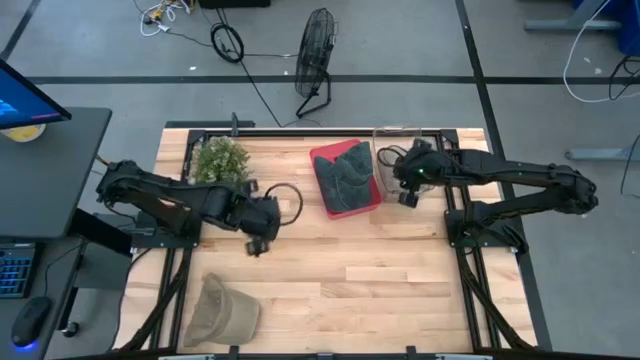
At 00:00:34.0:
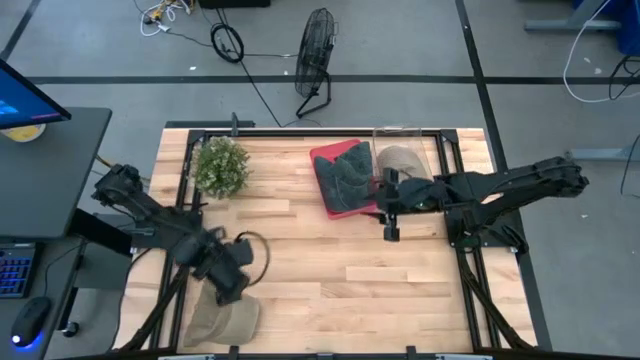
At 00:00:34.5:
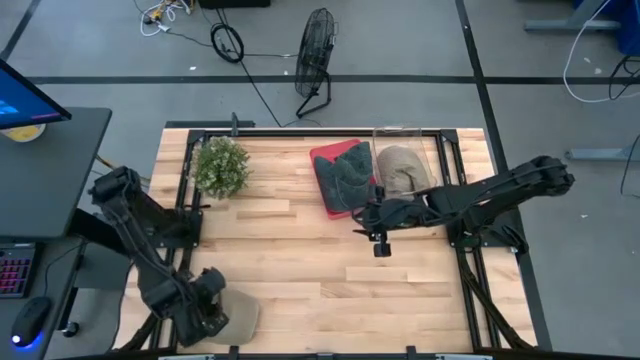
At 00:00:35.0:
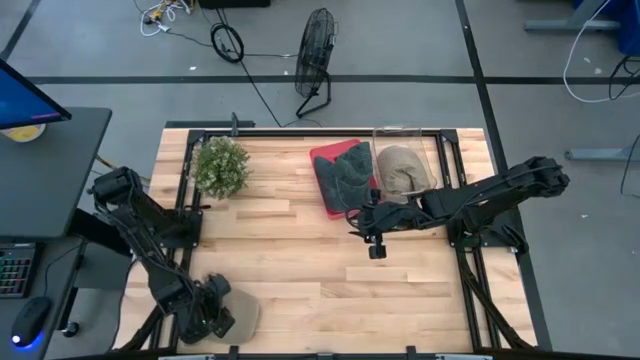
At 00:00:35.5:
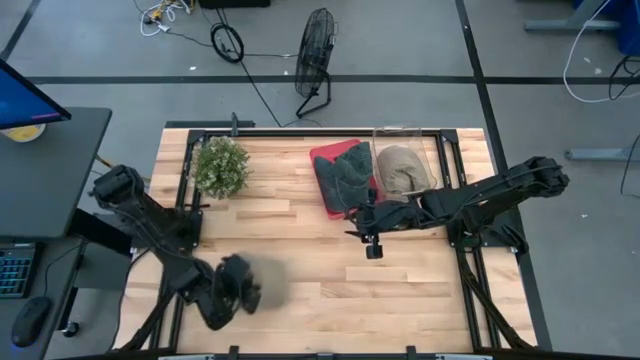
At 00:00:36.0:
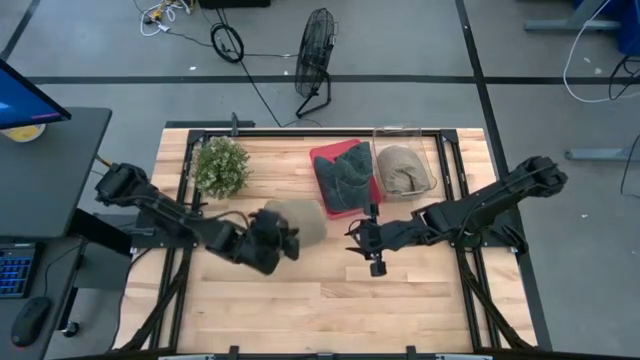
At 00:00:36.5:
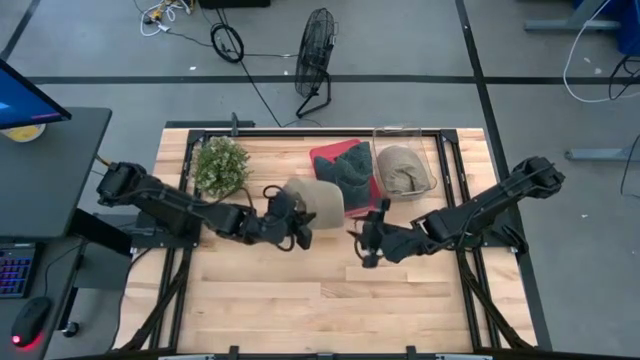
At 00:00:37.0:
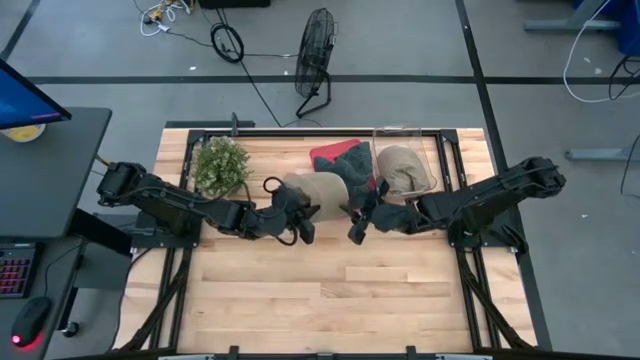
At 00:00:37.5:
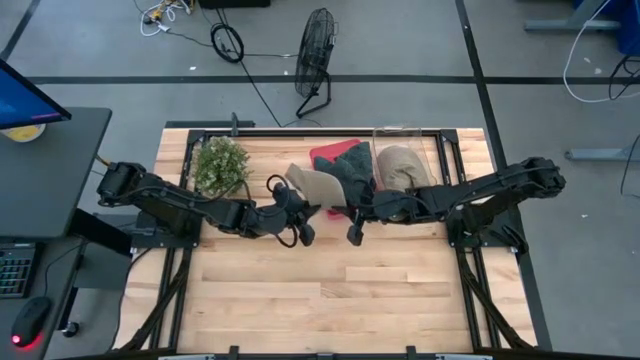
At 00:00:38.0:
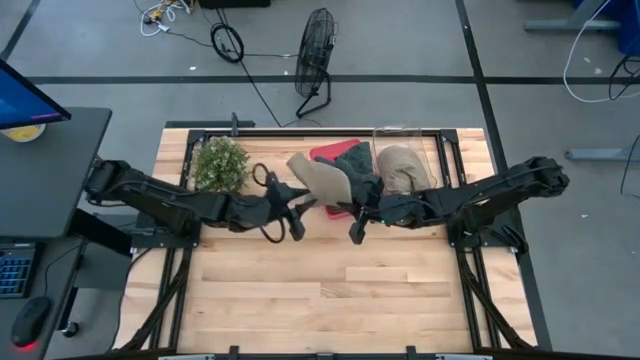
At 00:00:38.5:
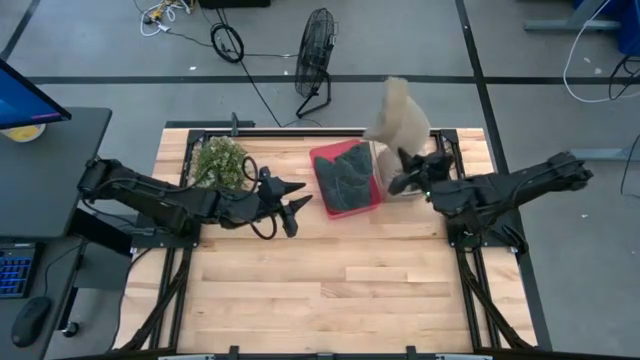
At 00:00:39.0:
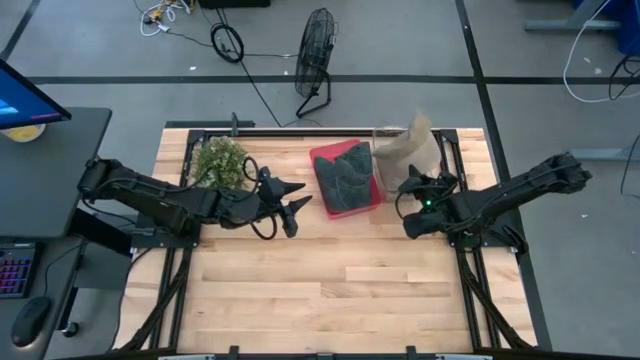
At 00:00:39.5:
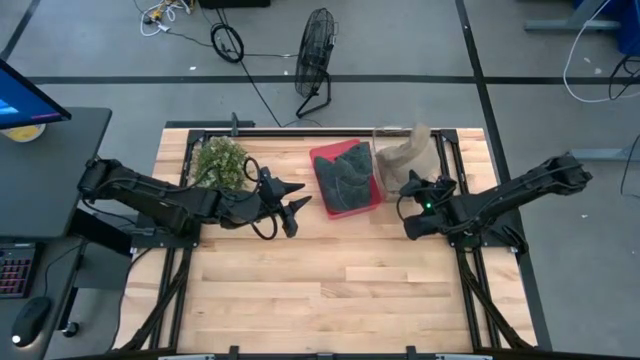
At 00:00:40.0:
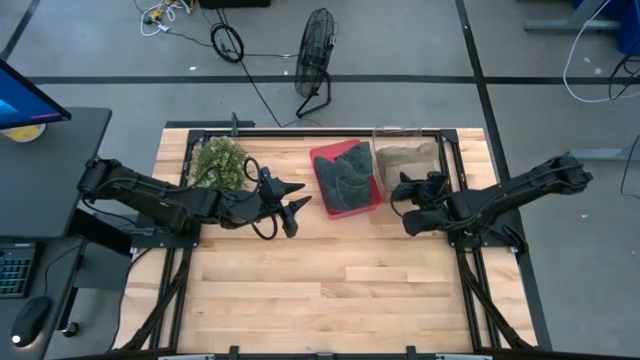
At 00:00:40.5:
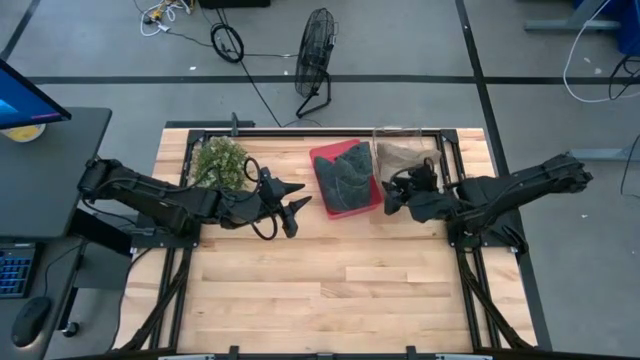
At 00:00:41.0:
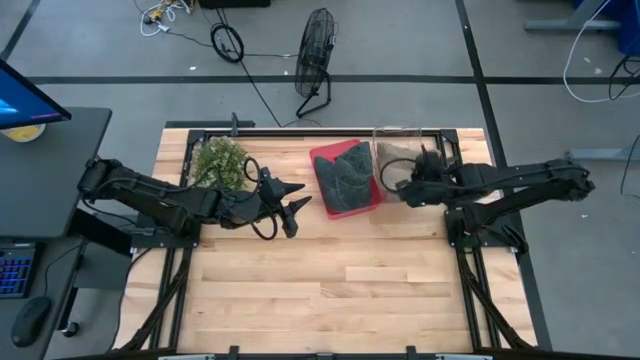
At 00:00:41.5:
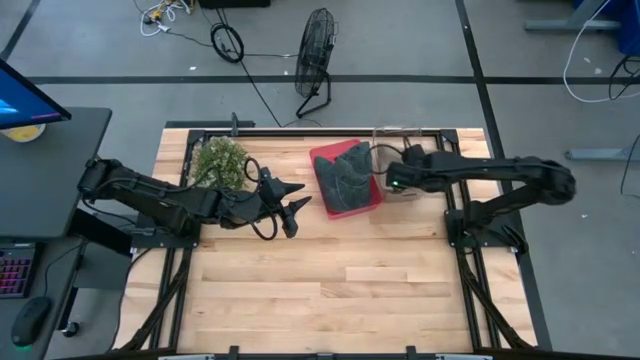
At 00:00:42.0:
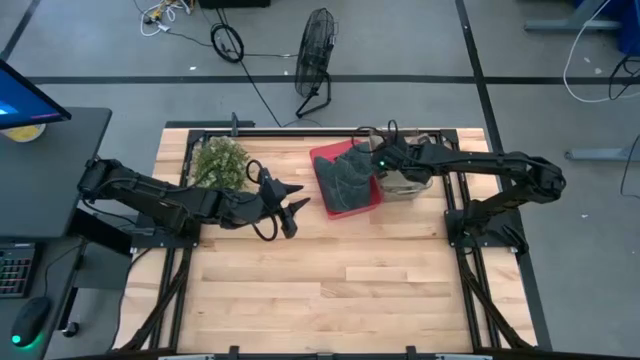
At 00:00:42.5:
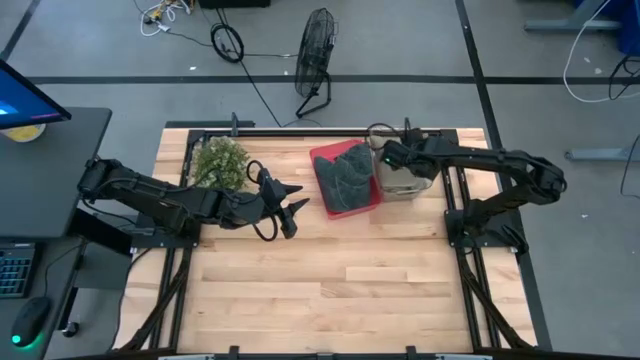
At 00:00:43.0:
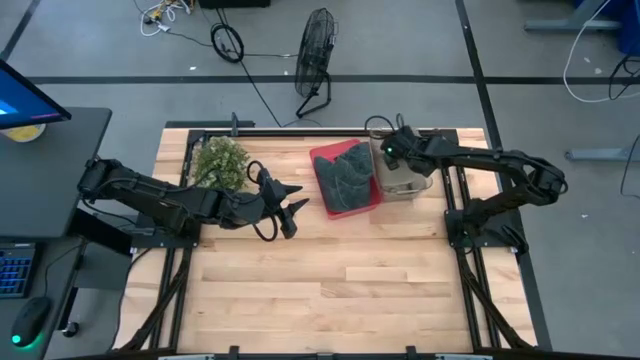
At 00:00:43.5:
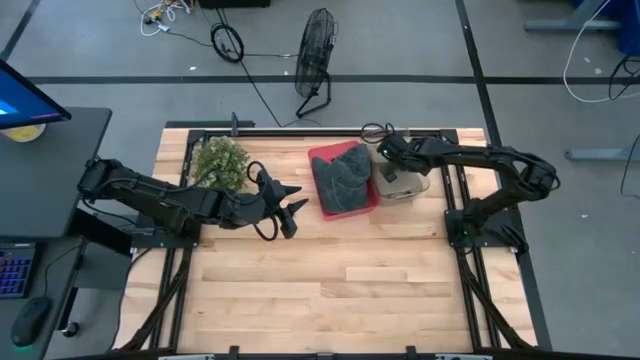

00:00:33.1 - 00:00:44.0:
Task: Pick & Place hat
Put the brown cap into the transparent bin

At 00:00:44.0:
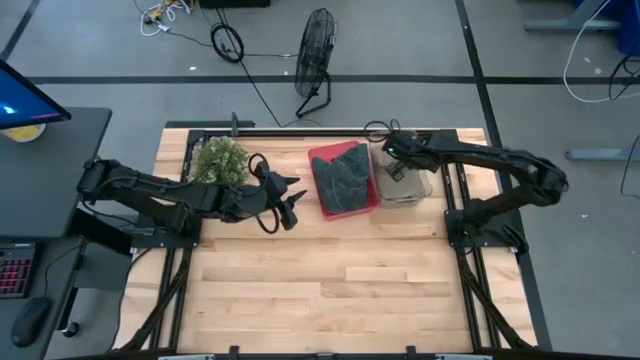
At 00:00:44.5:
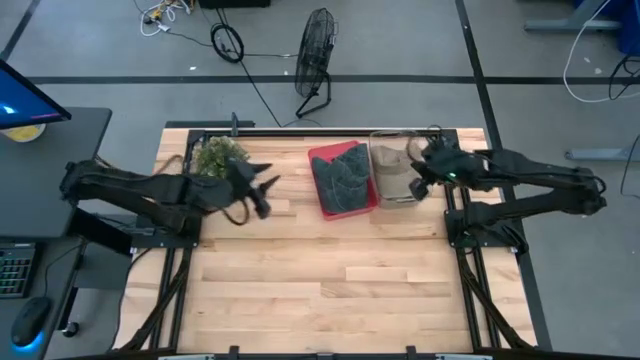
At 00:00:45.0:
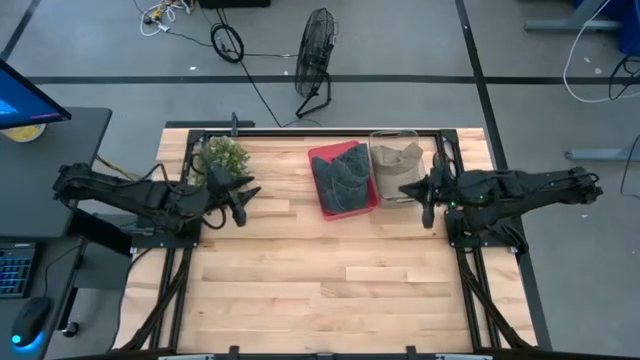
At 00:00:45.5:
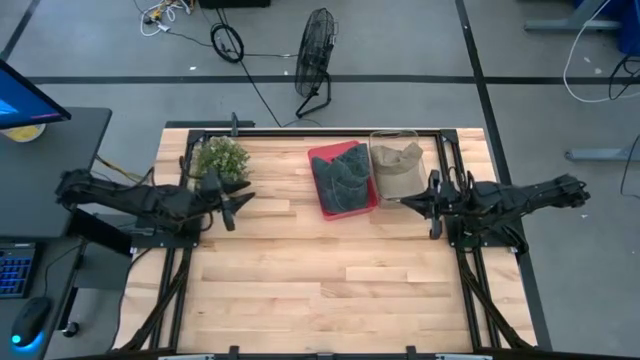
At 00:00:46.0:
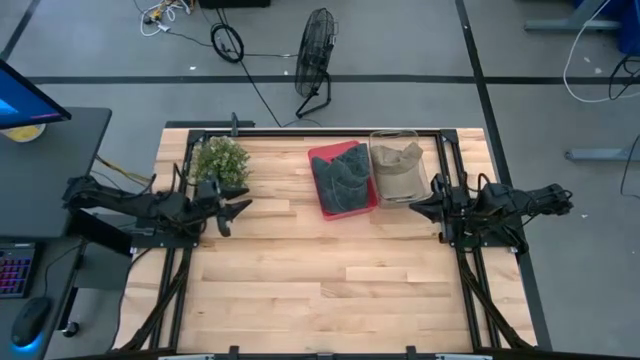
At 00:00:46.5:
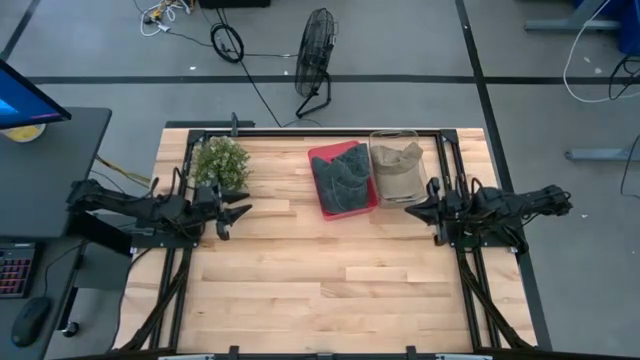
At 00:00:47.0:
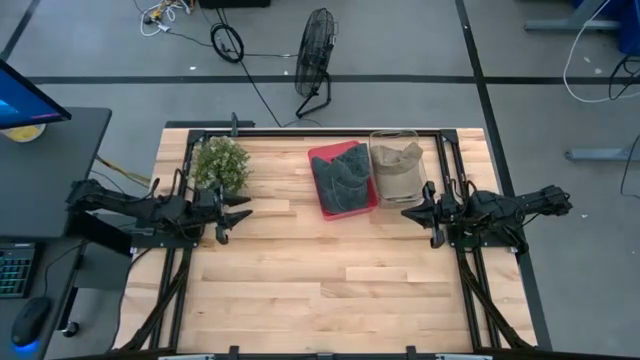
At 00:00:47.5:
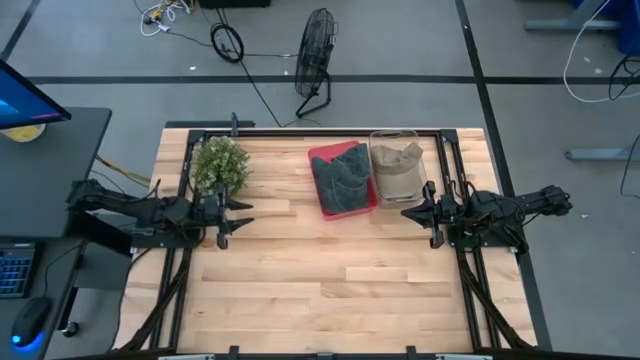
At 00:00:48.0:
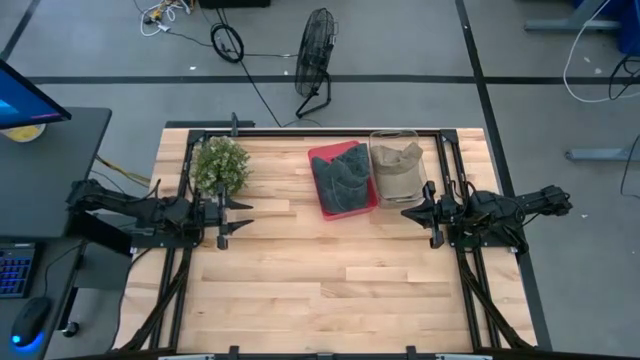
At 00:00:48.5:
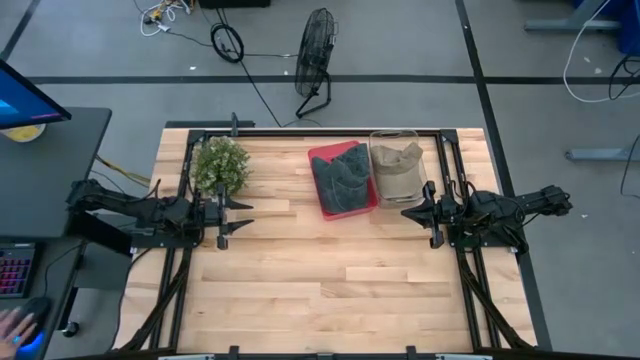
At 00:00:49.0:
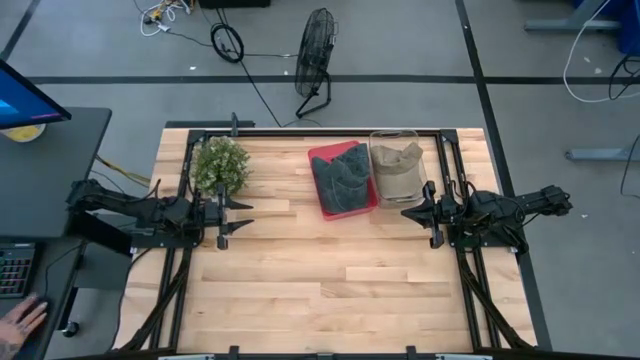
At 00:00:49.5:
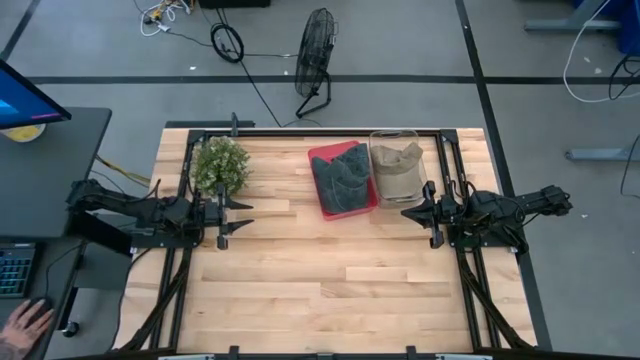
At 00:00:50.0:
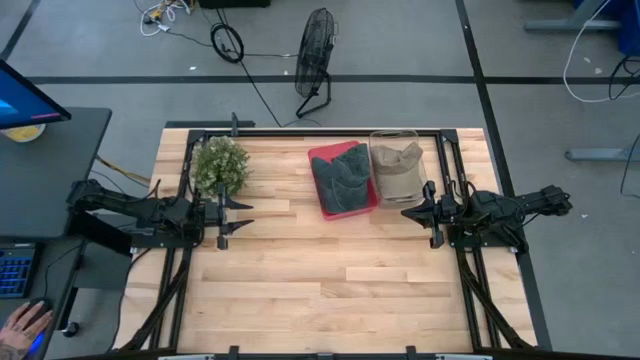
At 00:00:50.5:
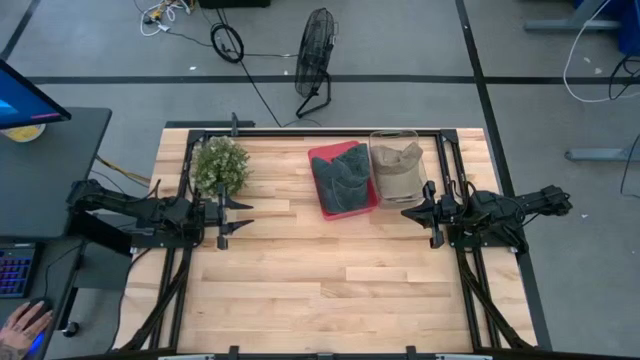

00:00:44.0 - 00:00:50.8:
Return to Home Position

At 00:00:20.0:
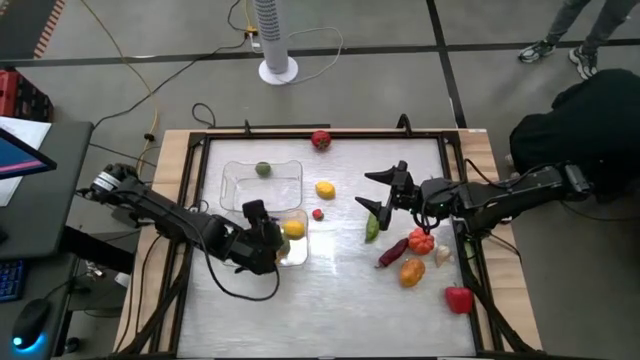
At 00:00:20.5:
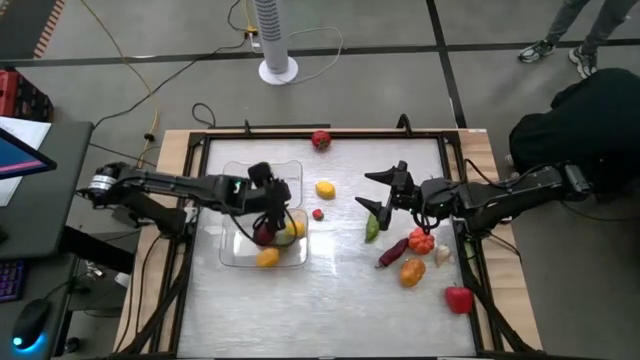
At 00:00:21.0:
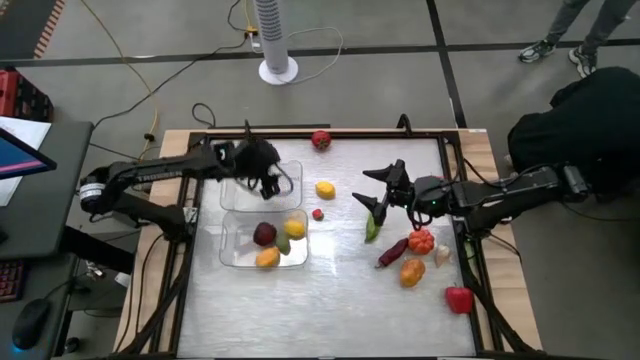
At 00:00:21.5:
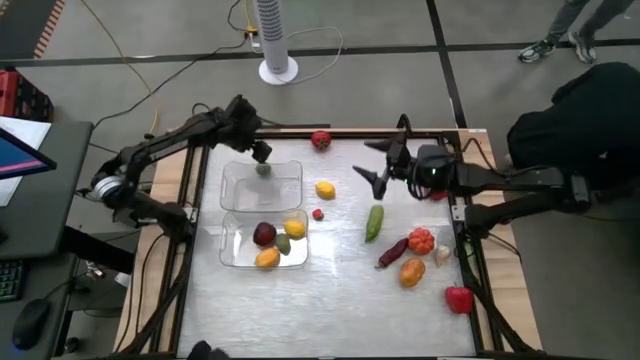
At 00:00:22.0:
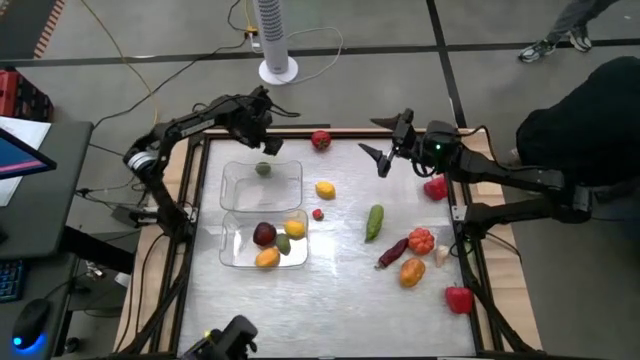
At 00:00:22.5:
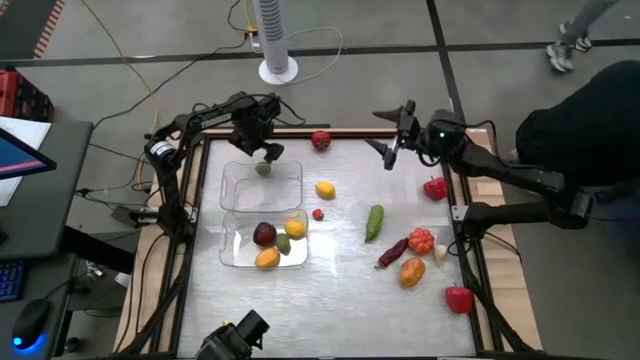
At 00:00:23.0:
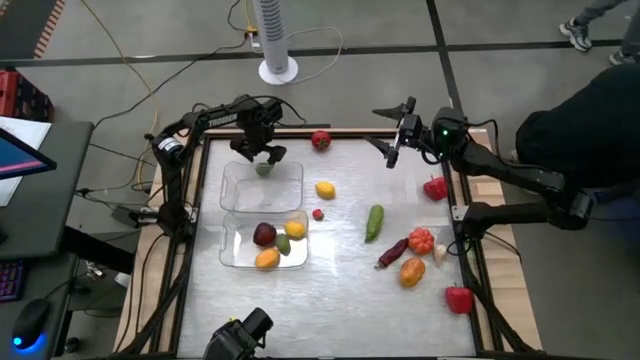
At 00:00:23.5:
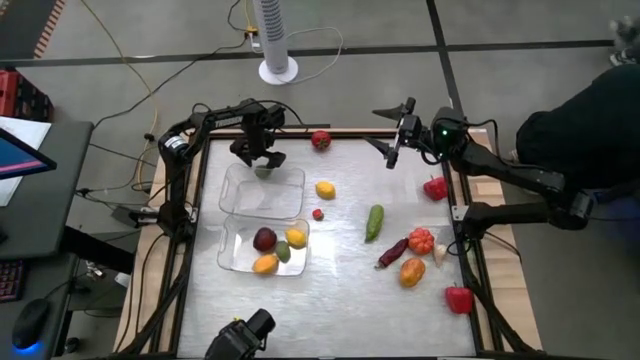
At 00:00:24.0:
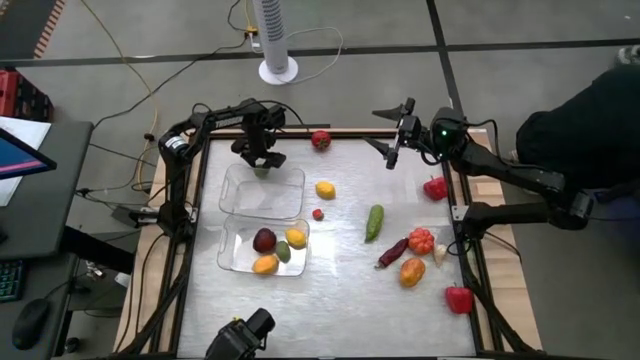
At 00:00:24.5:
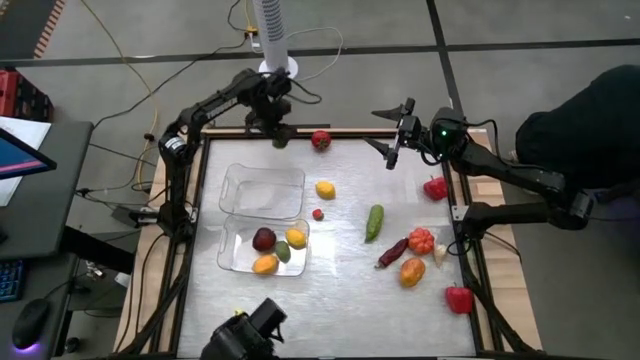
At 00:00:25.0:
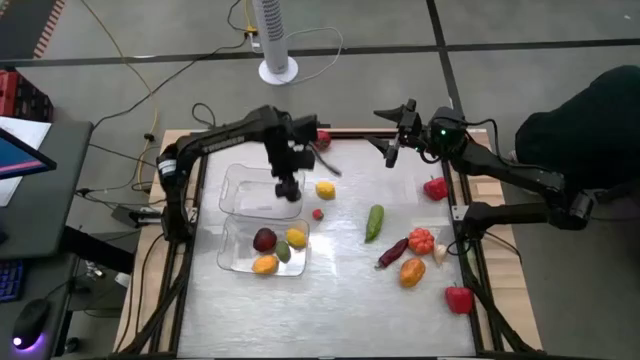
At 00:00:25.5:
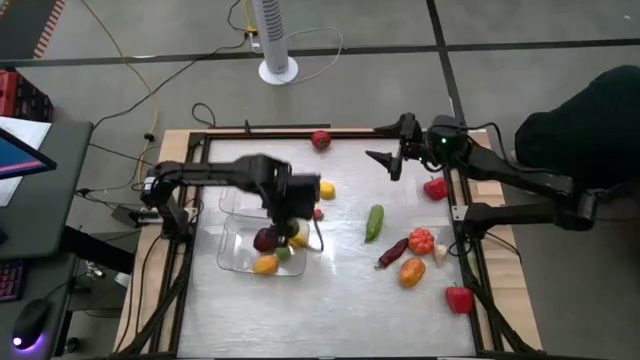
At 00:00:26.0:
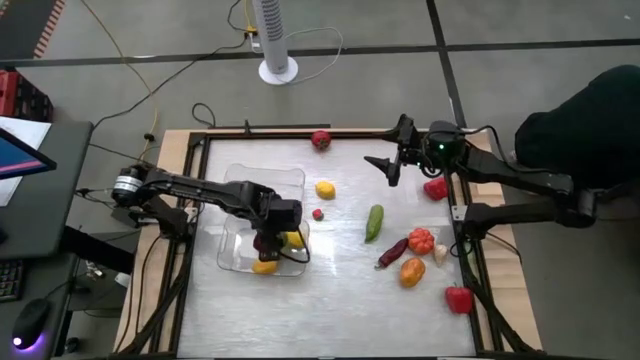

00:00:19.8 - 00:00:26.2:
Task: Sort produce into baskets
Put the green lime into the bottom transparent bin
